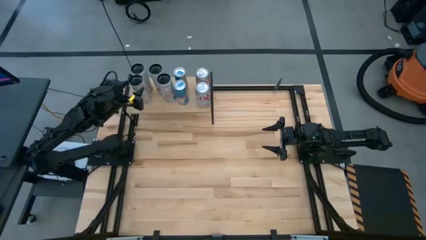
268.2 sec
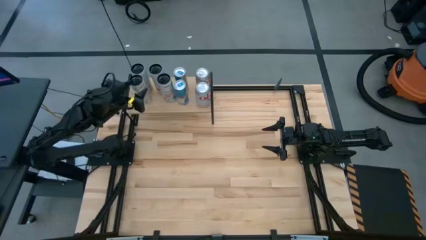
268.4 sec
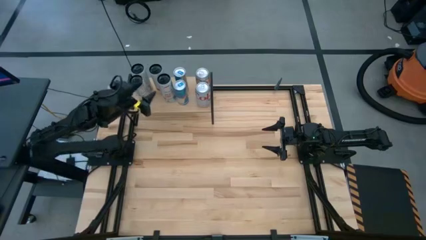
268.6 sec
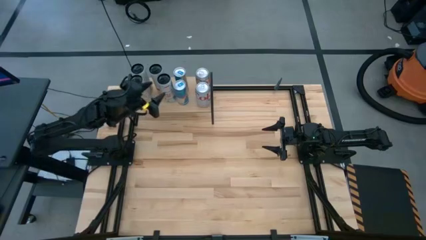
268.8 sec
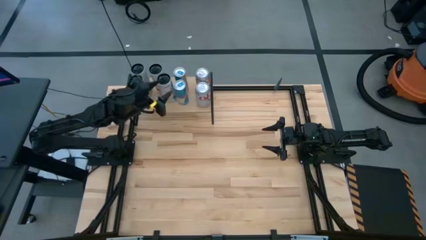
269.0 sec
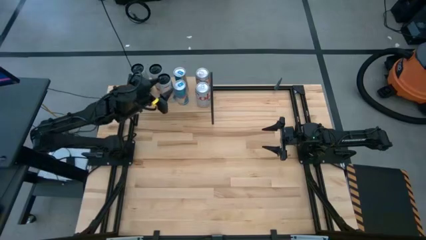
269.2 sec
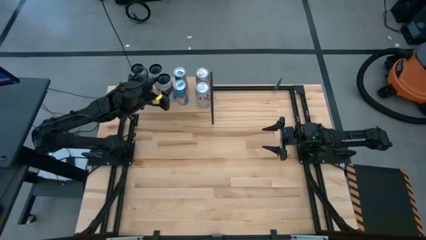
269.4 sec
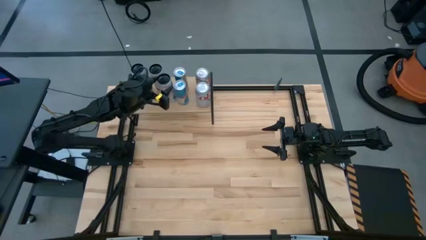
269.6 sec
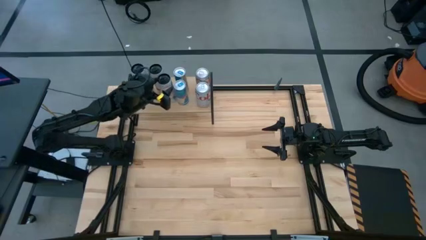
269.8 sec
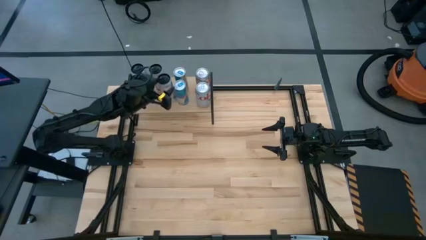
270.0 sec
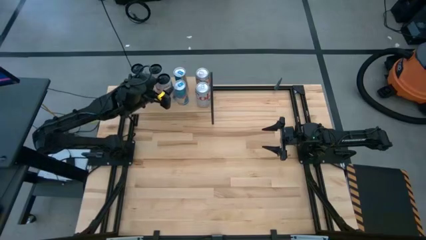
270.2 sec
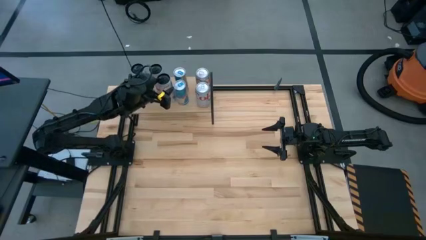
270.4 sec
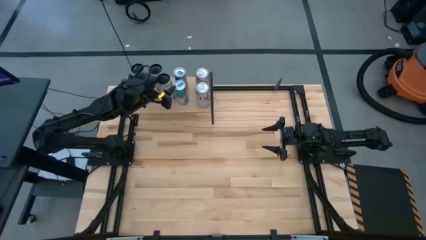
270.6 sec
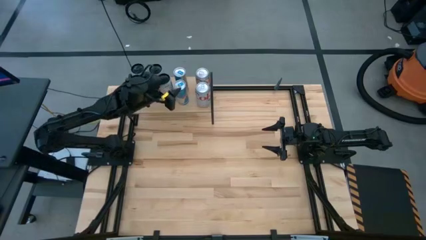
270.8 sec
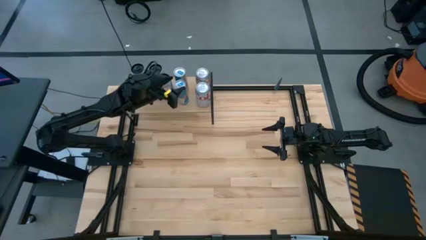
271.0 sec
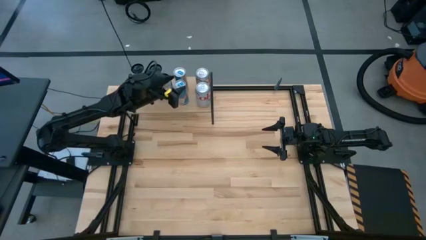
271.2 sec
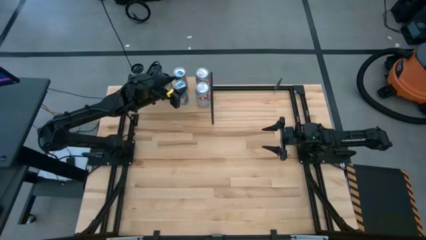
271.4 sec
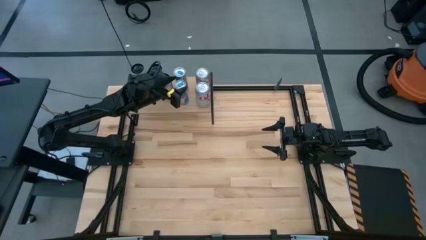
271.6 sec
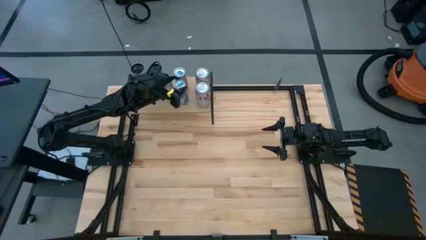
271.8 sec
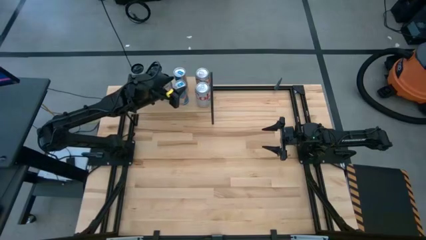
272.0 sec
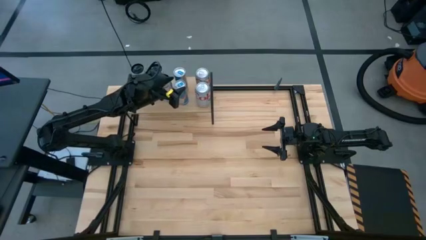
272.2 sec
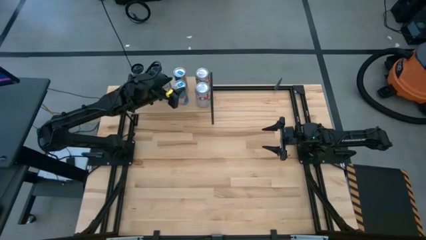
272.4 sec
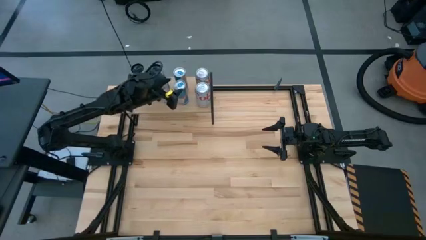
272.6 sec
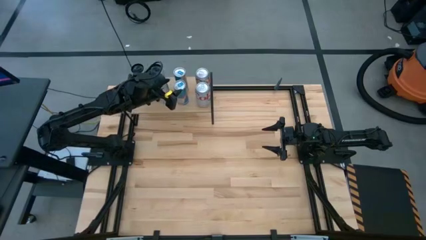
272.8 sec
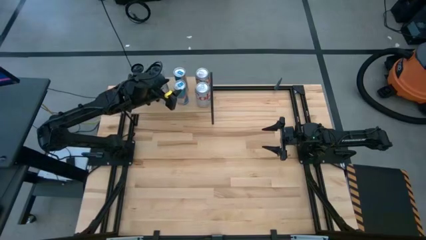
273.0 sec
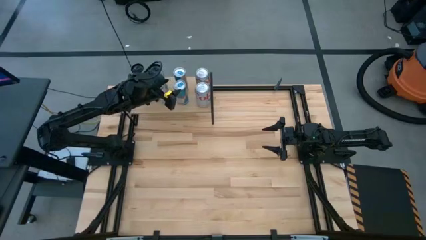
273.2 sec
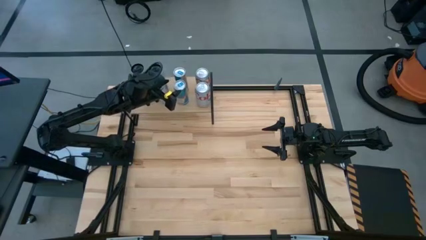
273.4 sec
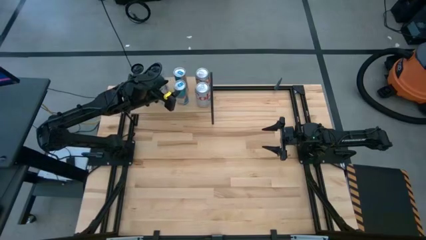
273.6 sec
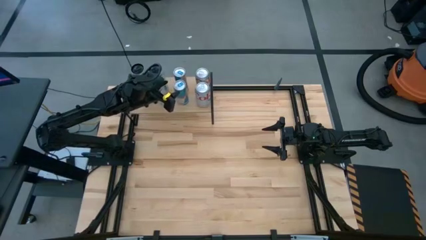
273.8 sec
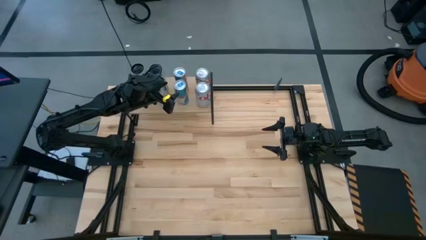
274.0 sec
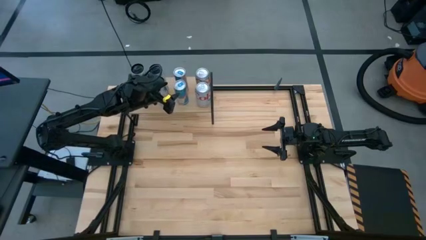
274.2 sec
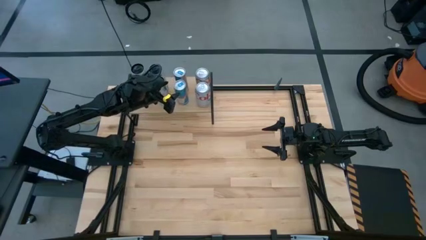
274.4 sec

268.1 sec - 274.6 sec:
Task: Place canned beverage on shelf
Adjust the white-pink soda can on the shelf

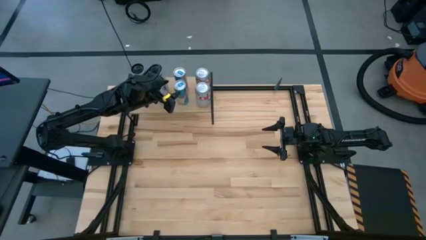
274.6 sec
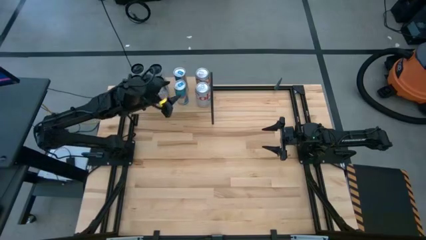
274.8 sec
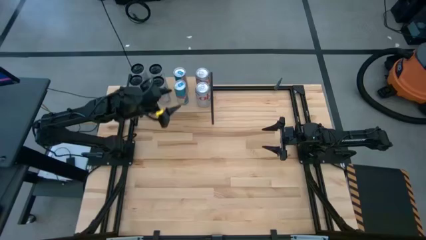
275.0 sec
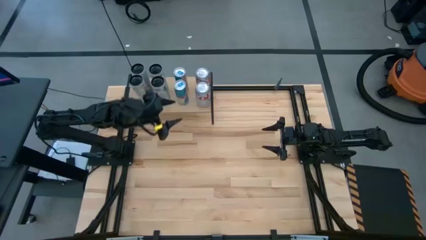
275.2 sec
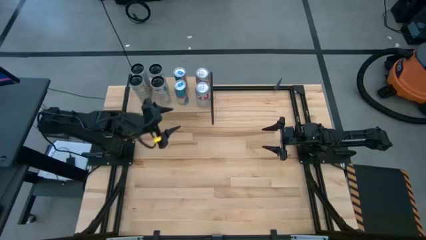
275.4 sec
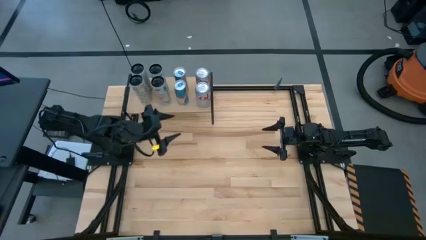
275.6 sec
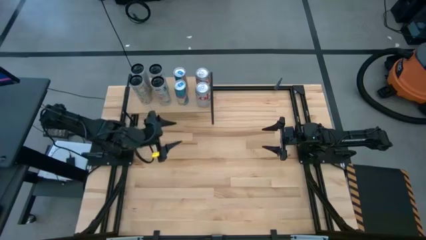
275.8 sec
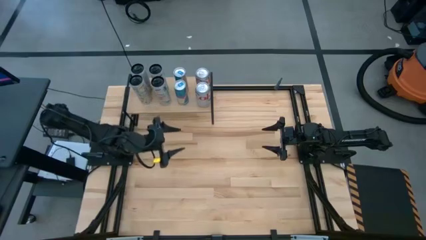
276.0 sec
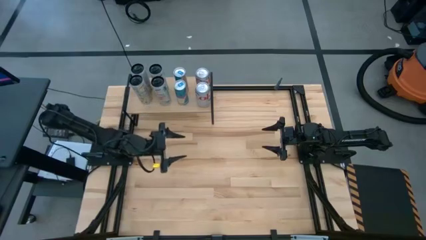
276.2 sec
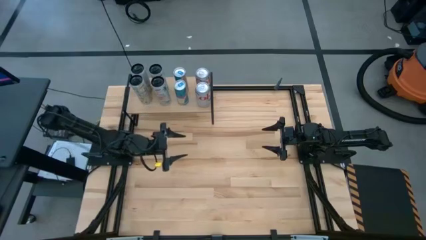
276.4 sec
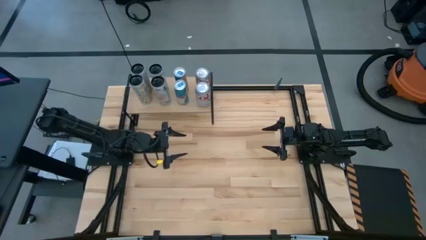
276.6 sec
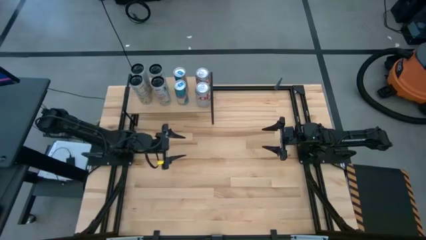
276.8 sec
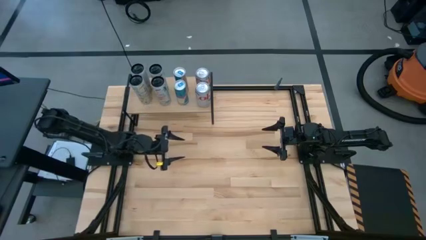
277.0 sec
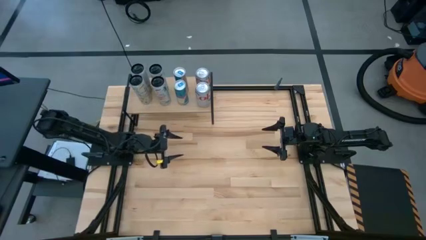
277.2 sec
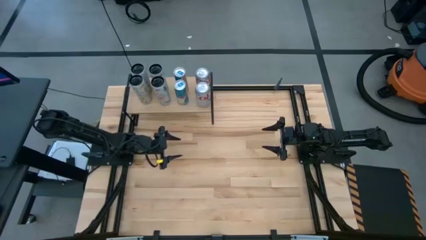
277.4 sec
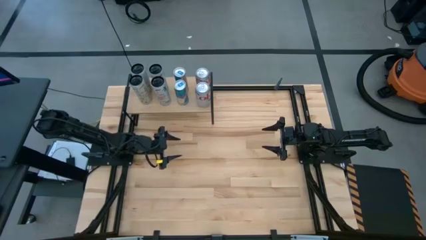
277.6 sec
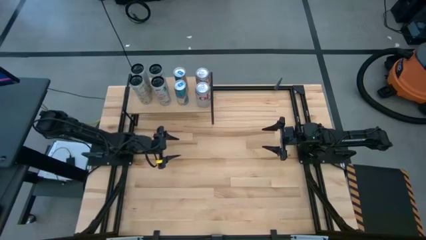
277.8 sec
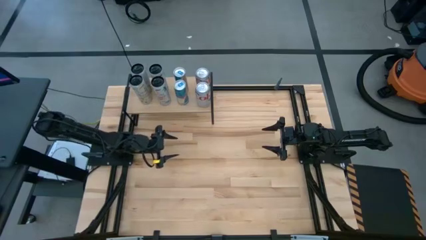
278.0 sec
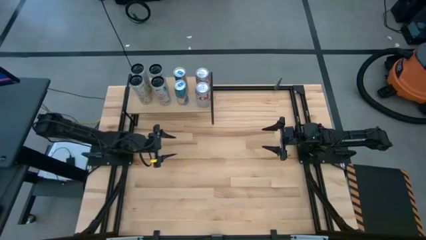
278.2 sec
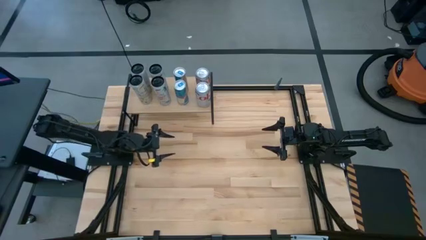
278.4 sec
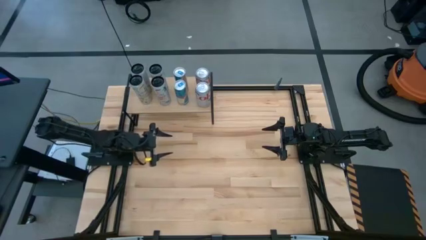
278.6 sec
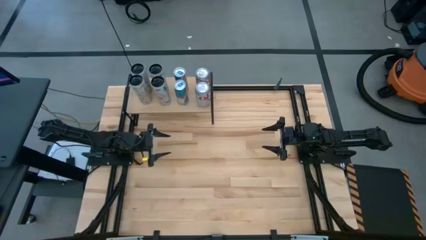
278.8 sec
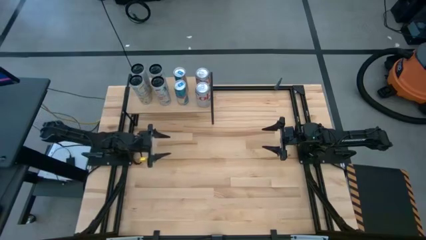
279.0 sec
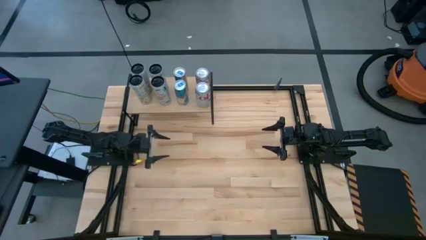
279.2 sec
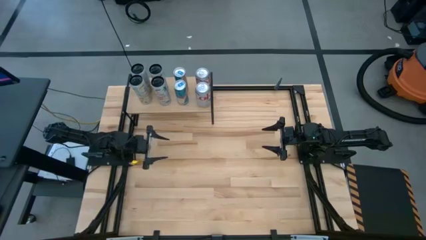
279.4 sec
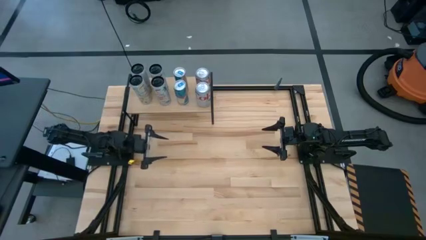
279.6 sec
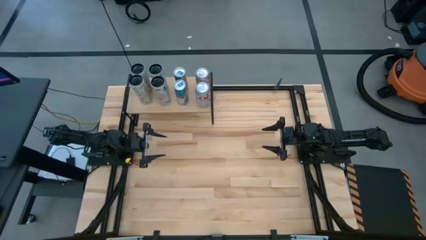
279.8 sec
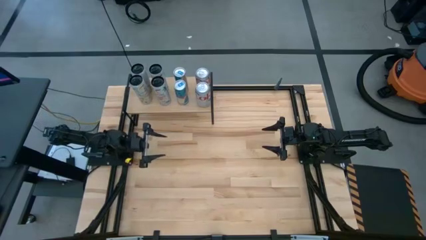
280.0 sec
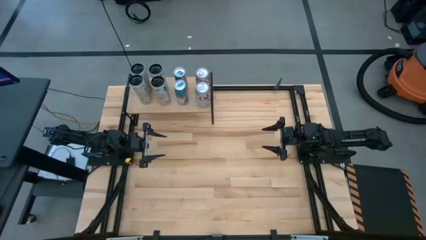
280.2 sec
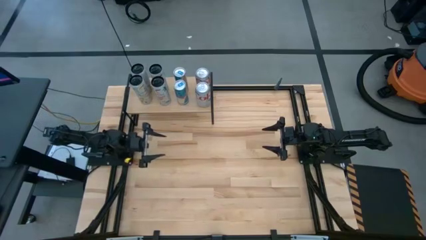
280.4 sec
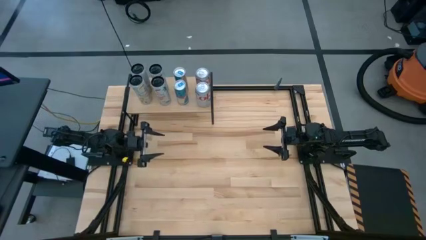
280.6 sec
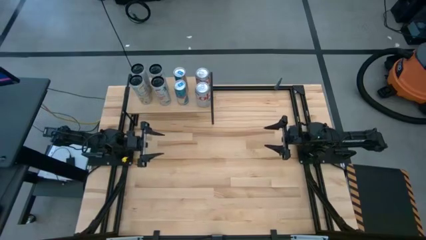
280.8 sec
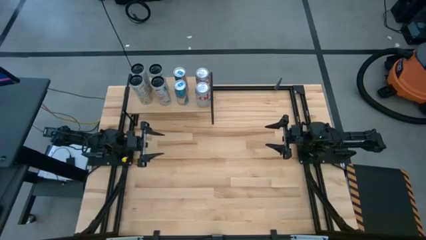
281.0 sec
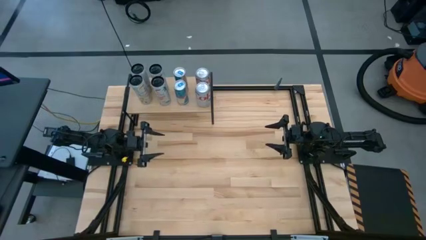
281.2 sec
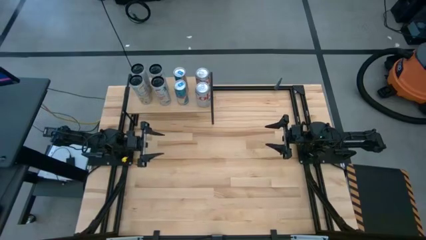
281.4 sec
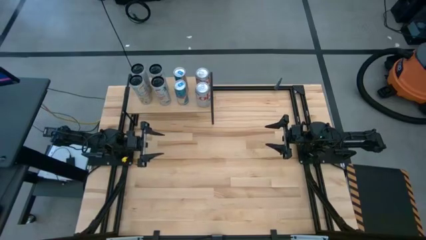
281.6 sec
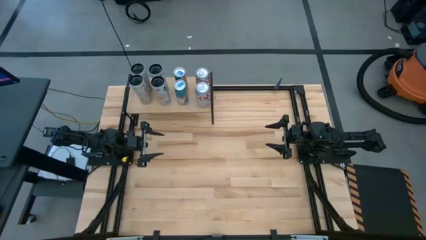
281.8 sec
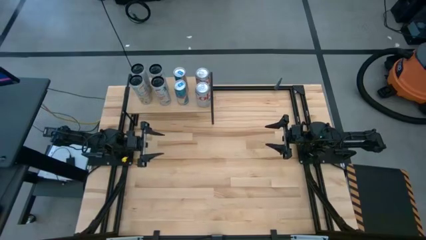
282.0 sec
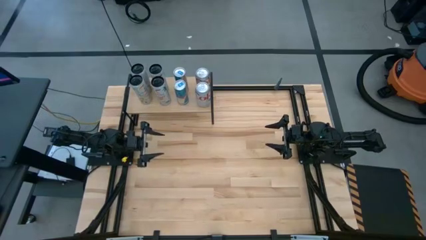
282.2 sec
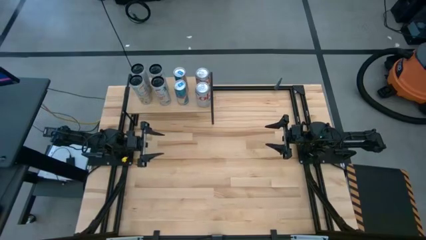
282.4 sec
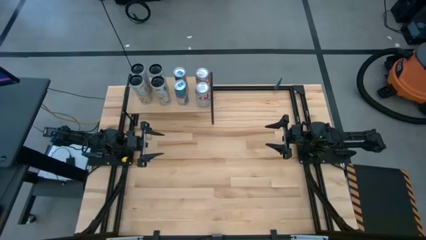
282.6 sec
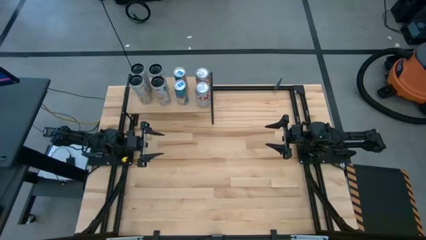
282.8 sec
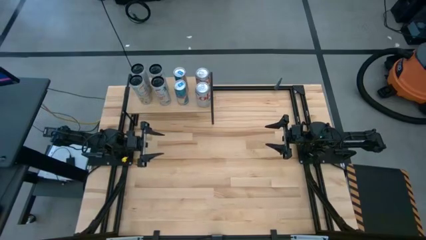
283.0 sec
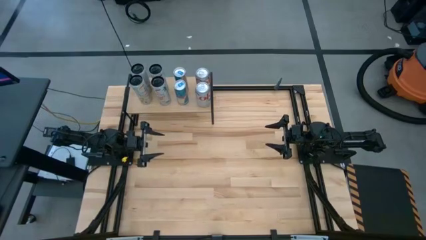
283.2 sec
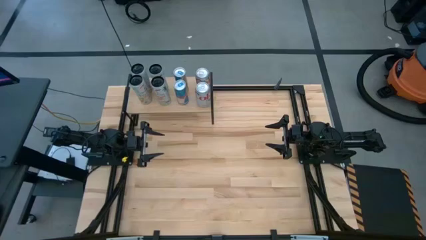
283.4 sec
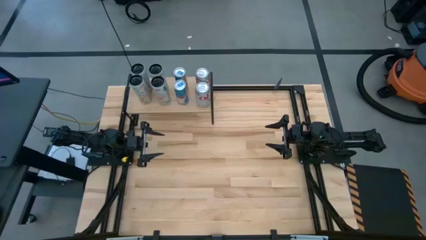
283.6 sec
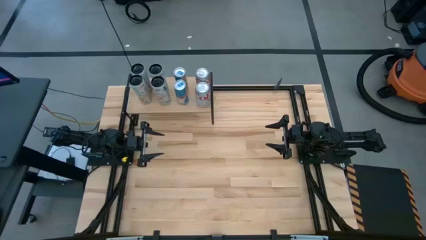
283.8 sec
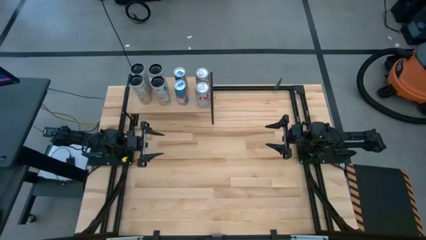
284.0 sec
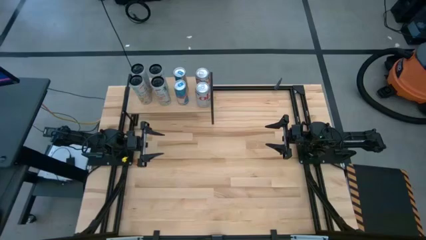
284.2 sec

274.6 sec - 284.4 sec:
Return to Home Position
